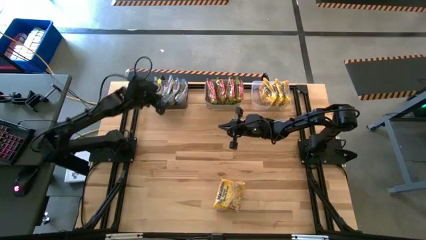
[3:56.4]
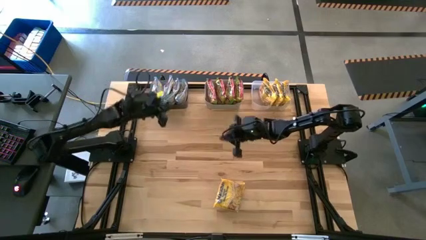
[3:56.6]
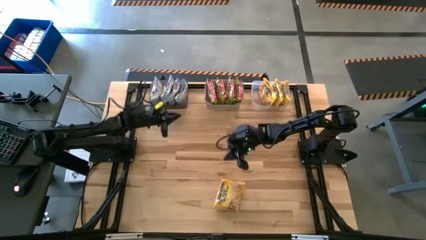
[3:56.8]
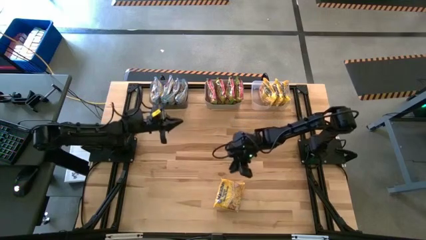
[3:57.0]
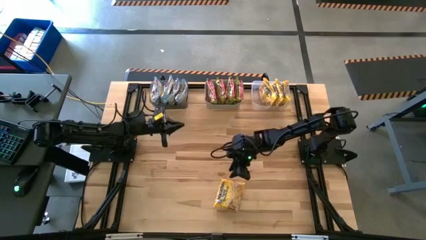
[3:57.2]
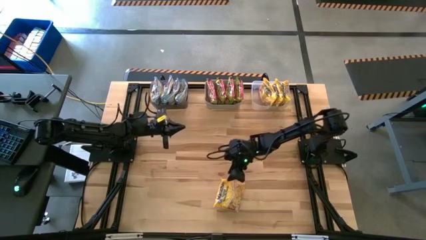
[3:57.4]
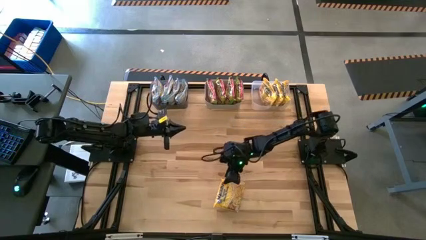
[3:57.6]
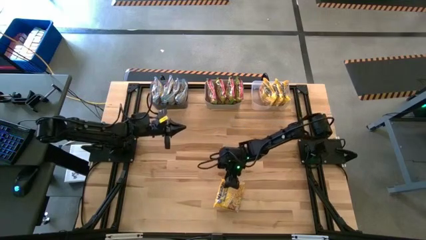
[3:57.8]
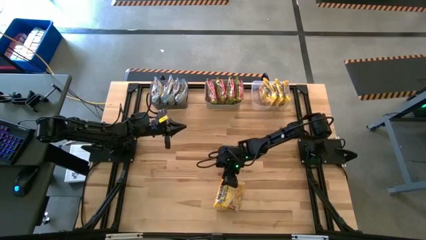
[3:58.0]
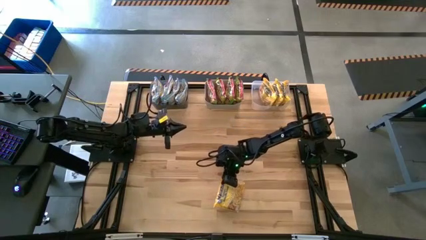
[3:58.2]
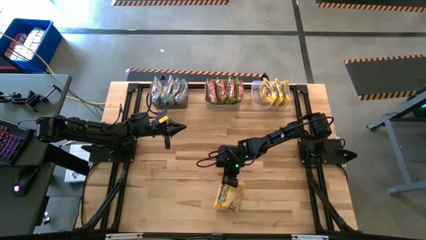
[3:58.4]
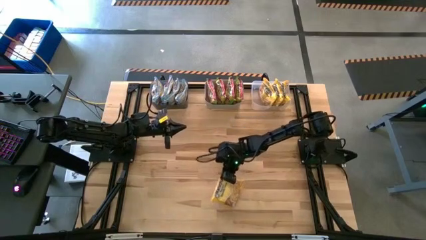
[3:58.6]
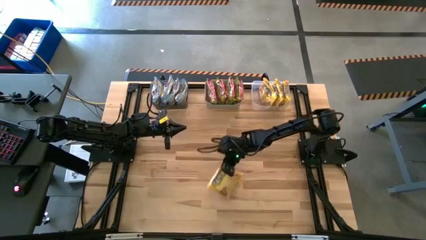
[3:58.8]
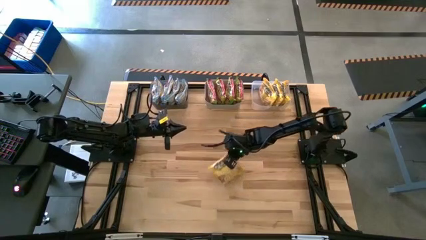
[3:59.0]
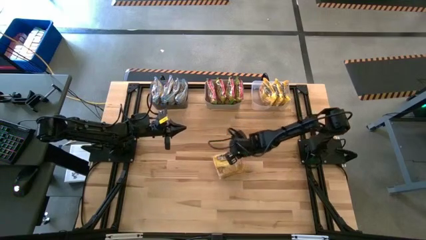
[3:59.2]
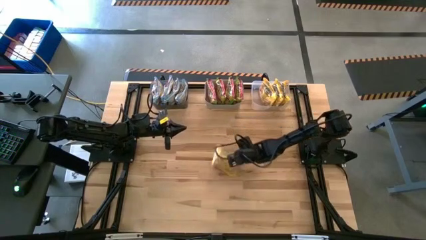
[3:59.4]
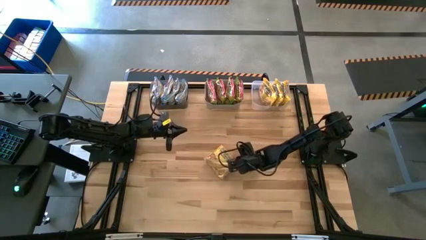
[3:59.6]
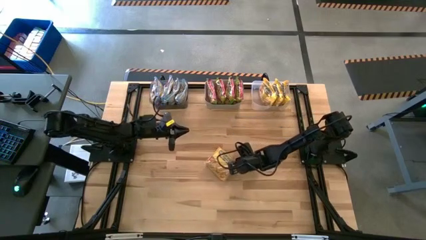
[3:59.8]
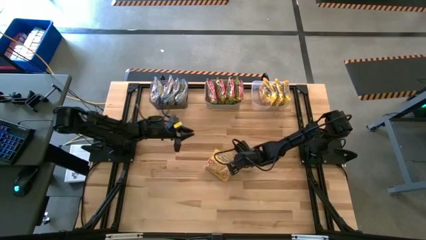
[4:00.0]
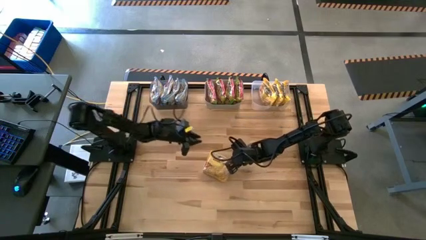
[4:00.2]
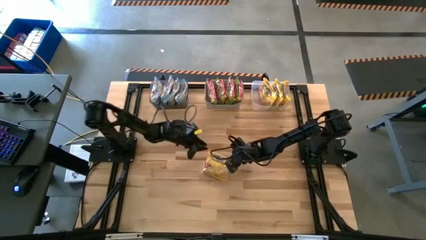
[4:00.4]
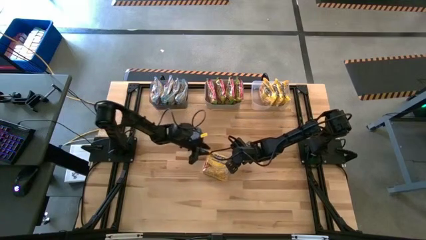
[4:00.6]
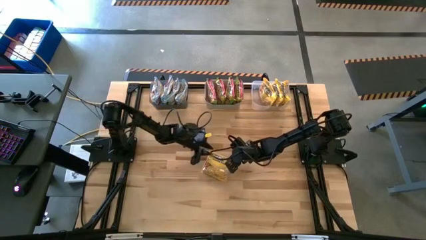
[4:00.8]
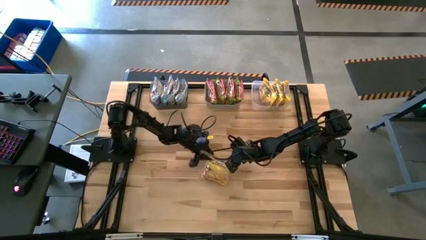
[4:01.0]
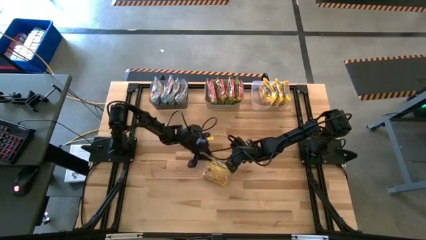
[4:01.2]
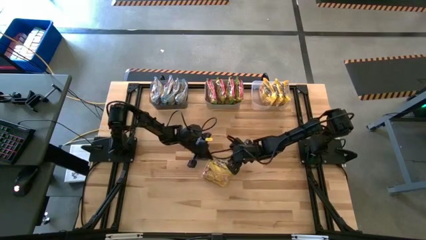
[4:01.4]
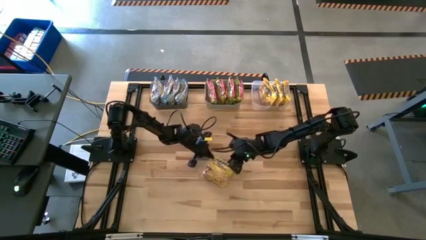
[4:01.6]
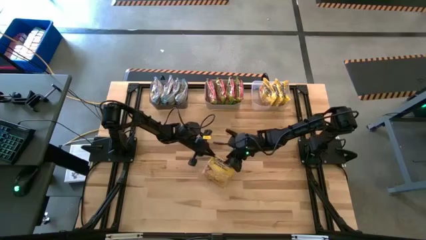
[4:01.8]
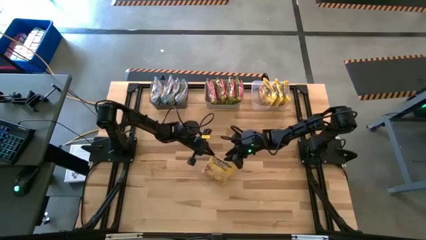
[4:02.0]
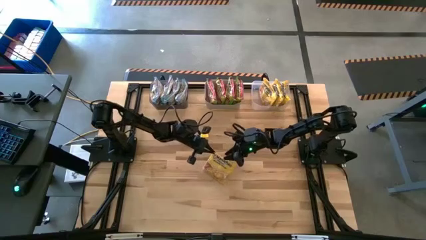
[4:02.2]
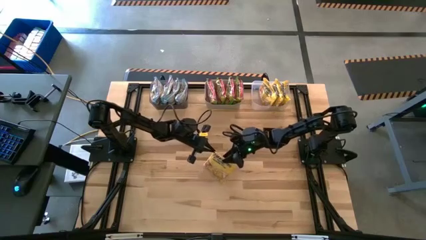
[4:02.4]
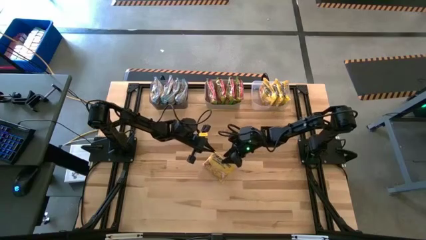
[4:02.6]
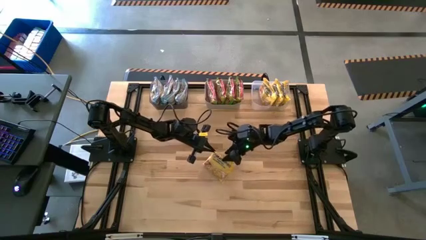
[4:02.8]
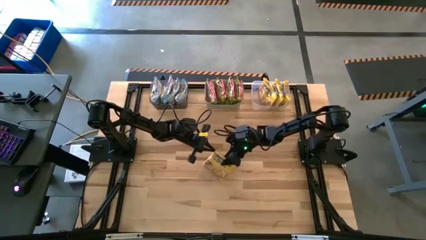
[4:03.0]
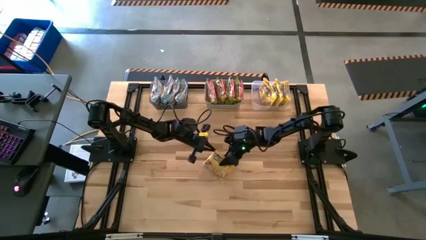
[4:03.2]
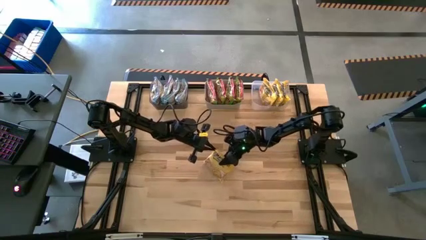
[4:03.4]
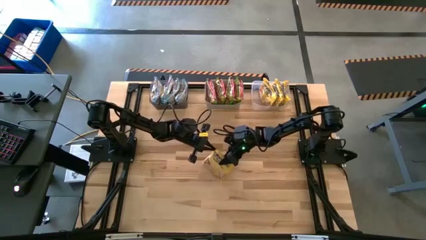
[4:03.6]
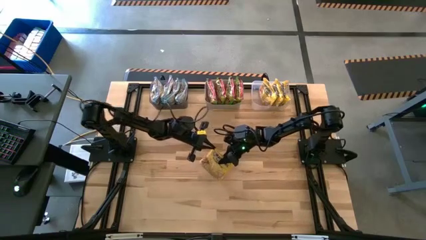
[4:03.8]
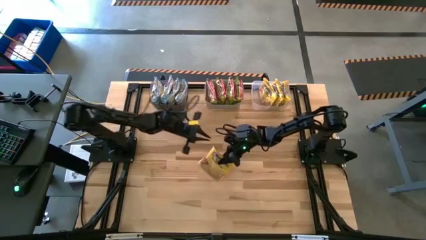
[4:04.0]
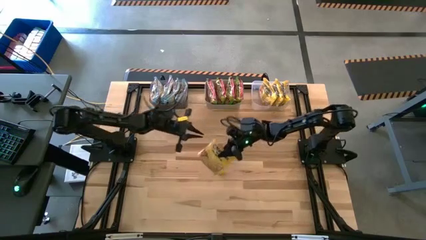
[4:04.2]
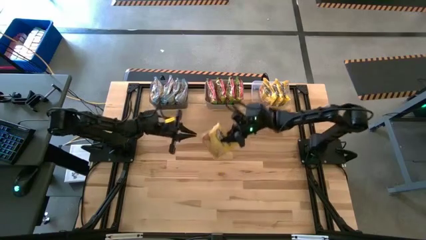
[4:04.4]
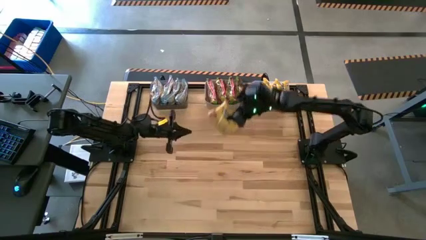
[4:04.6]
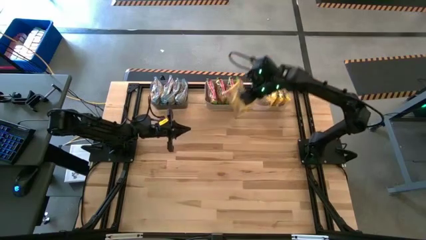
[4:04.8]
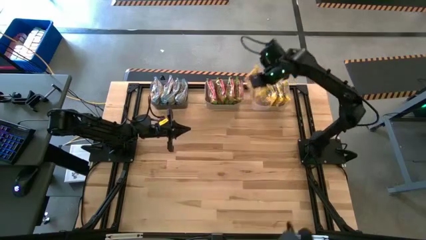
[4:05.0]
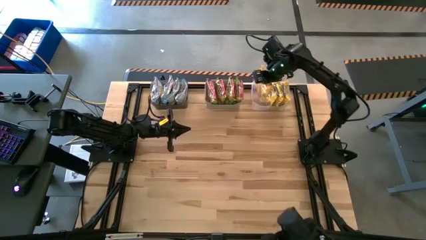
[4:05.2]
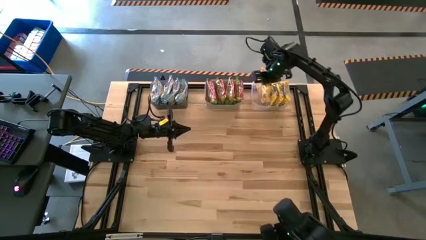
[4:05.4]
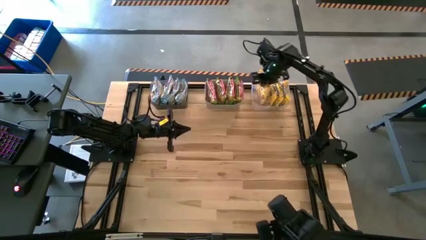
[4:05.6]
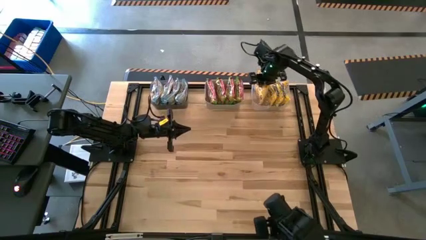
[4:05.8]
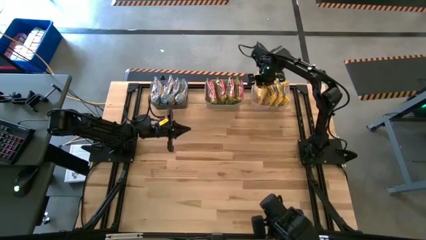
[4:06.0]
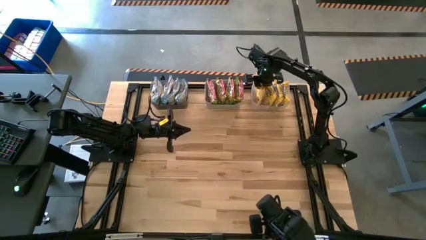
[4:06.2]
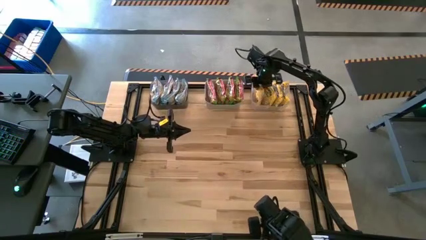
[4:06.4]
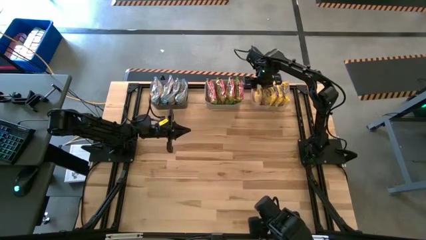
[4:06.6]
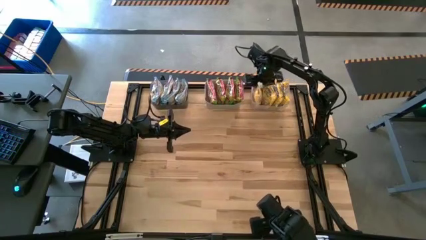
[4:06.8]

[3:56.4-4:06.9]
Task: Sort Maruchan noodles
Put the yellow noodle pack into the transparent bin

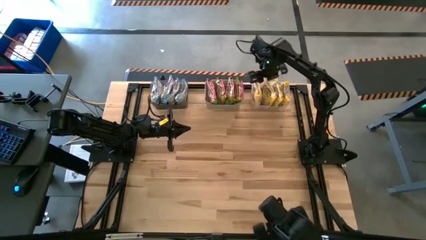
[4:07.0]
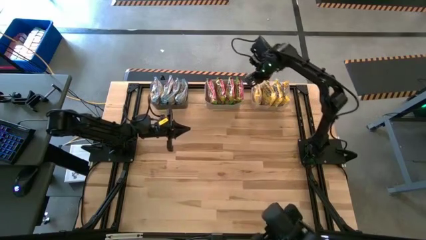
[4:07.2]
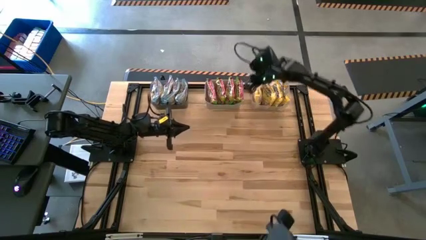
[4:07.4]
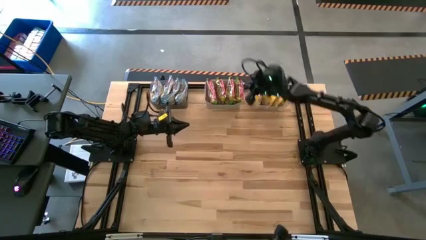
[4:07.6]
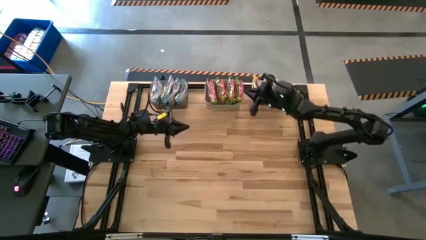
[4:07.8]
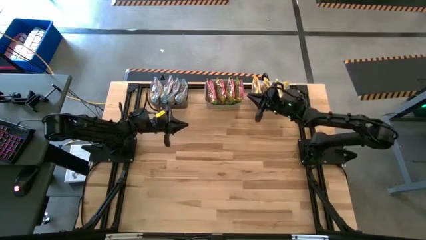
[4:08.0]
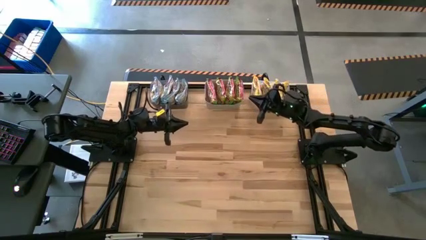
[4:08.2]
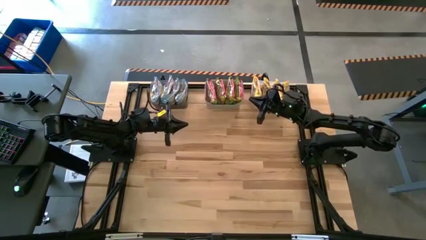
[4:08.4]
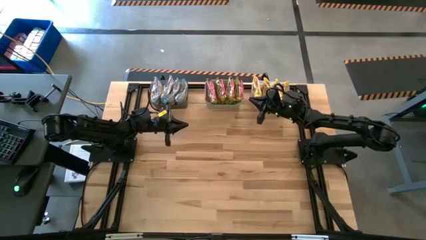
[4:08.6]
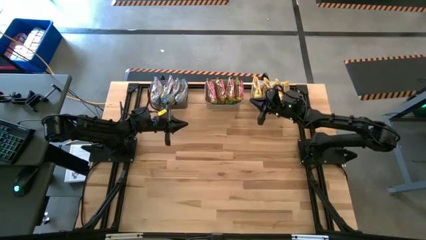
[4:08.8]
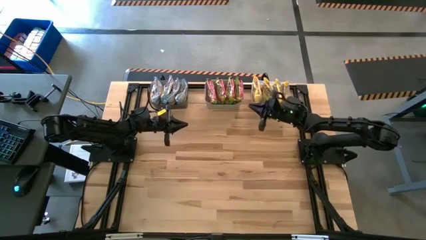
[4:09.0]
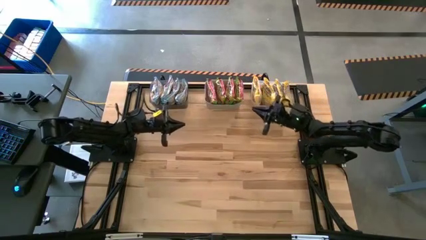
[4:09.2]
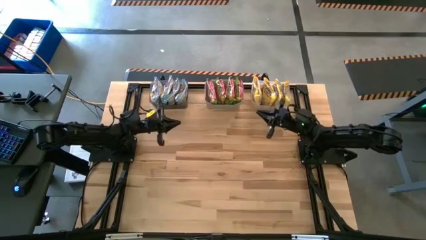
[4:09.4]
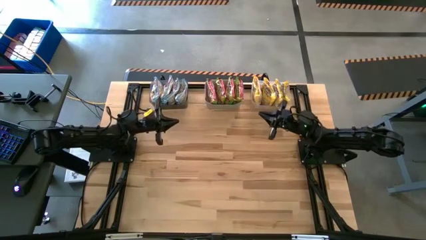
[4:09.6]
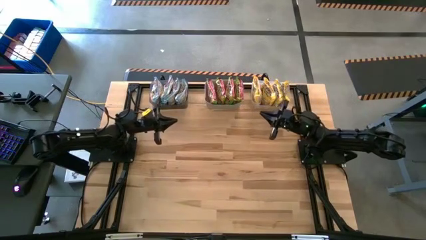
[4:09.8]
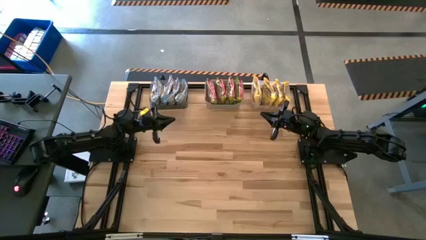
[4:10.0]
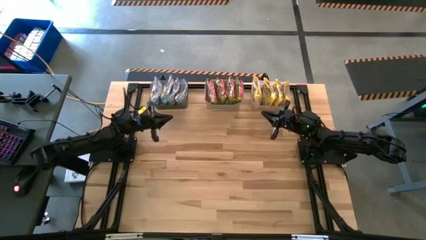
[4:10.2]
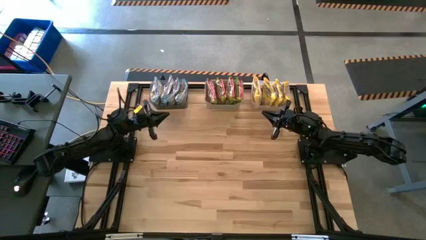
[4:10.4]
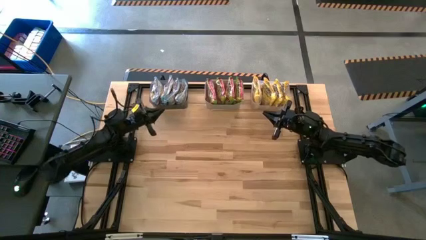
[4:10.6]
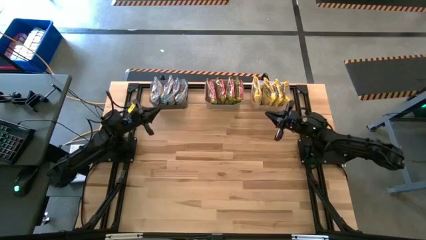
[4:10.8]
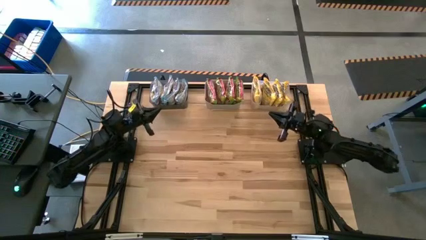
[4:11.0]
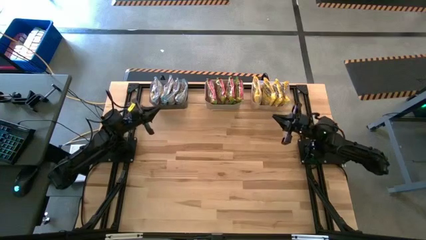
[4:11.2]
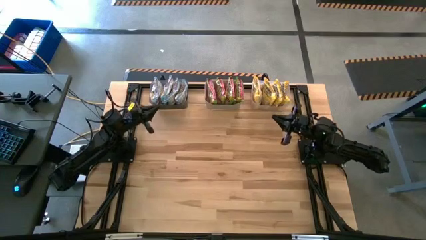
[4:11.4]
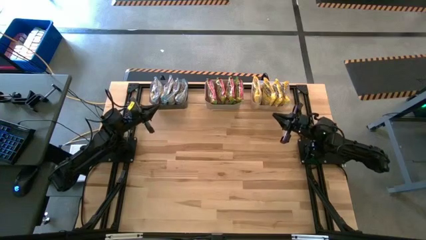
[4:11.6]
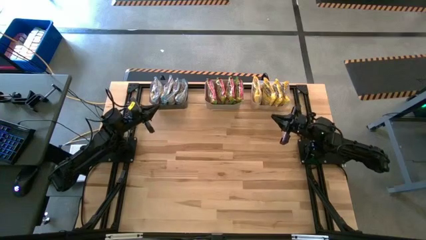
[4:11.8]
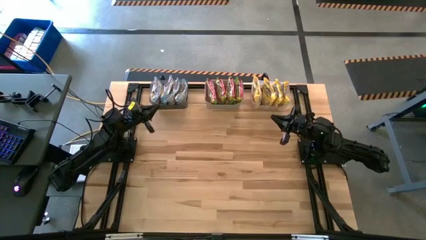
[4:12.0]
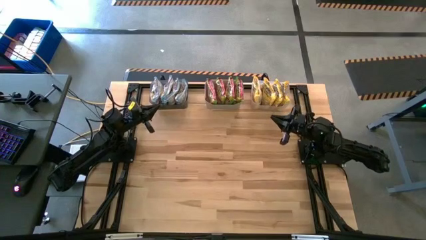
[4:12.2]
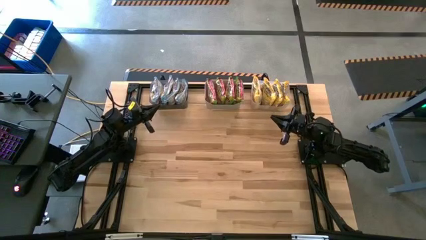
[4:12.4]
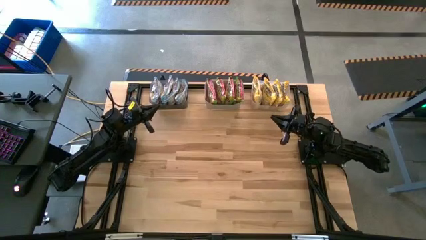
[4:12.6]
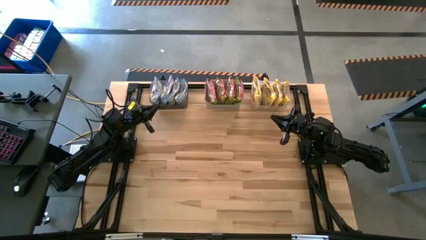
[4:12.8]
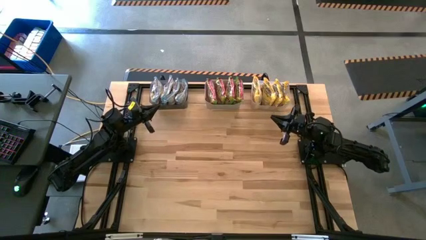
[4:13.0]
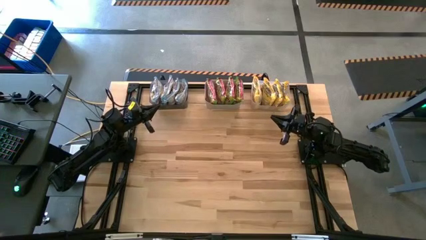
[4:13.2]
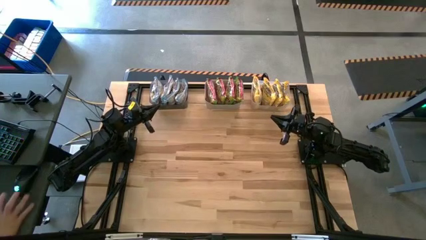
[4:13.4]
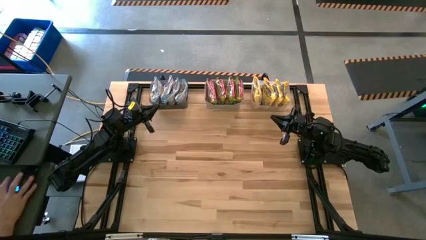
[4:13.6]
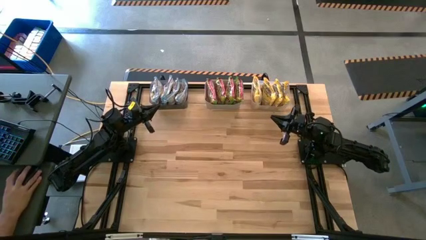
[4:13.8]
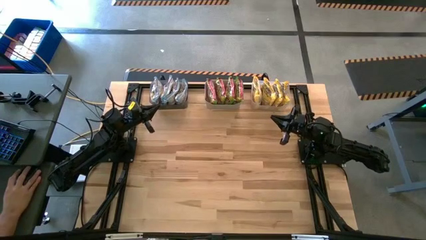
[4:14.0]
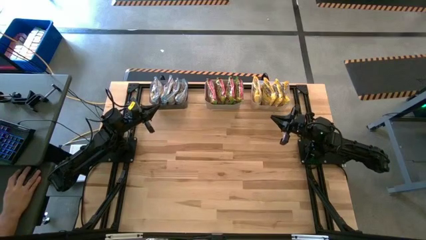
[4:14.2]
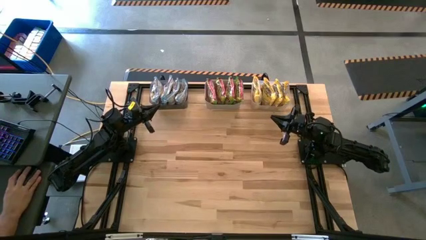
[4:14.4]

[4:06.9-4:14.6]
Return to Home Position
